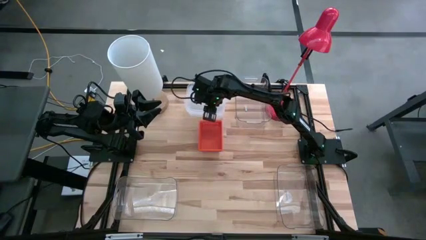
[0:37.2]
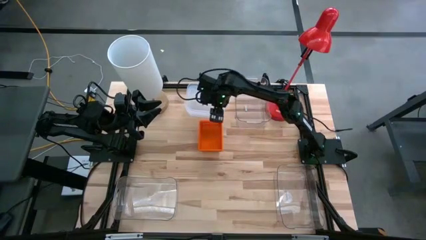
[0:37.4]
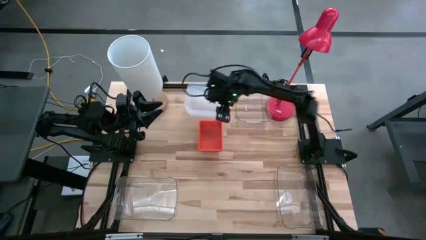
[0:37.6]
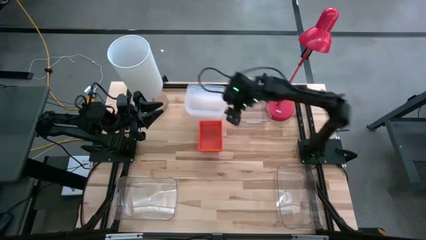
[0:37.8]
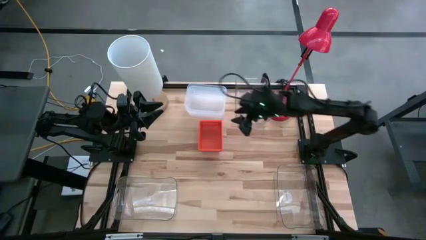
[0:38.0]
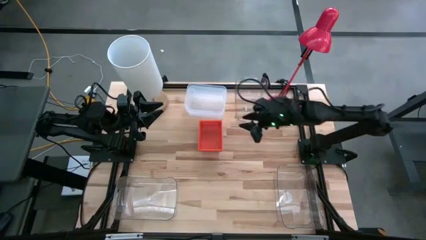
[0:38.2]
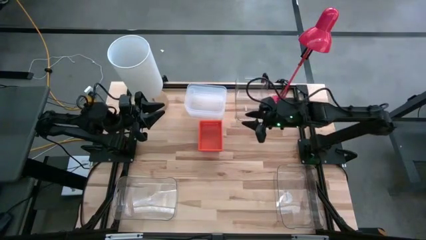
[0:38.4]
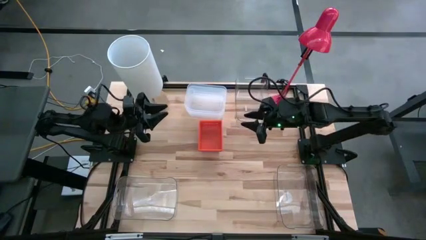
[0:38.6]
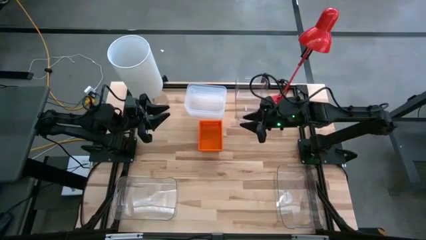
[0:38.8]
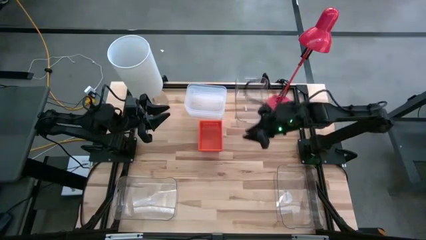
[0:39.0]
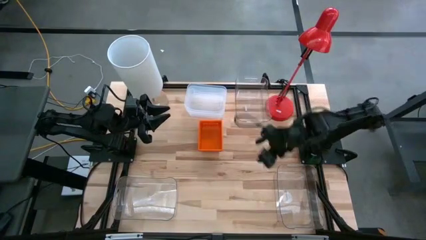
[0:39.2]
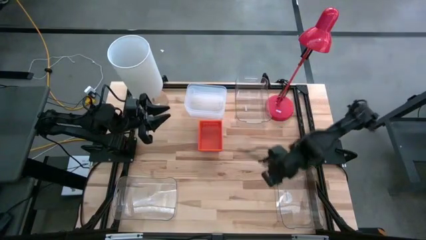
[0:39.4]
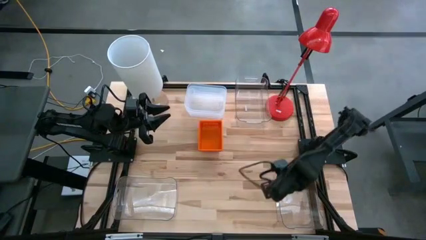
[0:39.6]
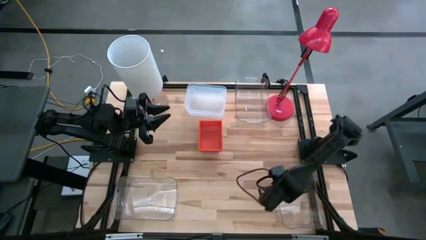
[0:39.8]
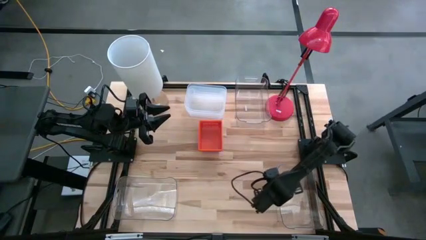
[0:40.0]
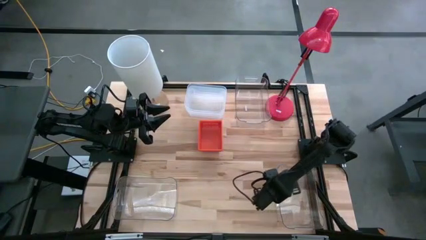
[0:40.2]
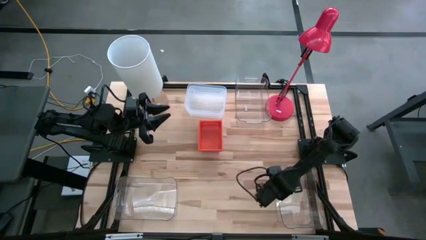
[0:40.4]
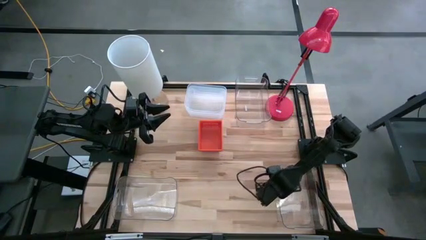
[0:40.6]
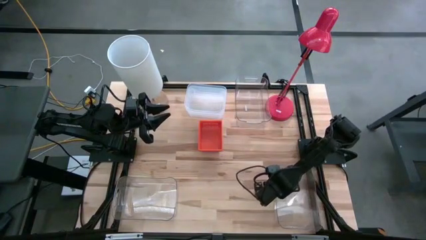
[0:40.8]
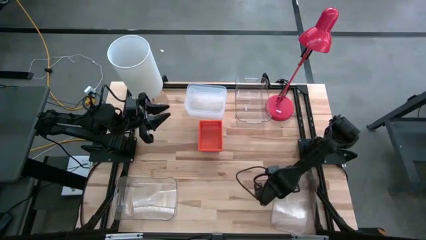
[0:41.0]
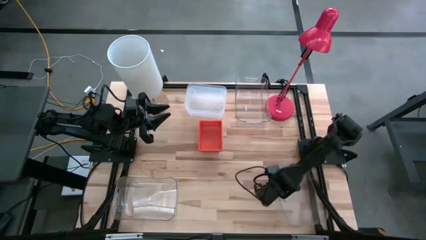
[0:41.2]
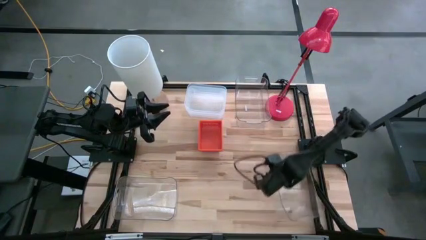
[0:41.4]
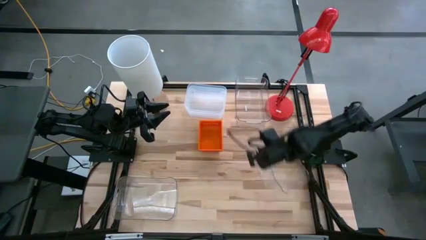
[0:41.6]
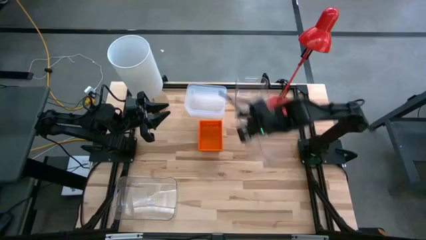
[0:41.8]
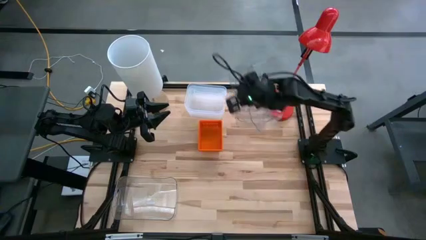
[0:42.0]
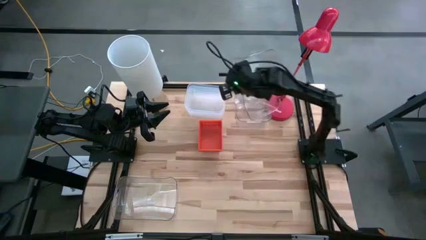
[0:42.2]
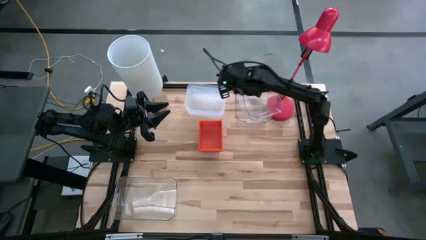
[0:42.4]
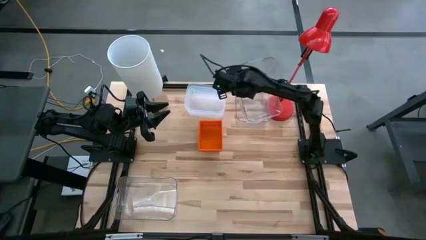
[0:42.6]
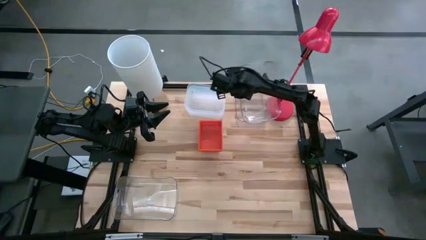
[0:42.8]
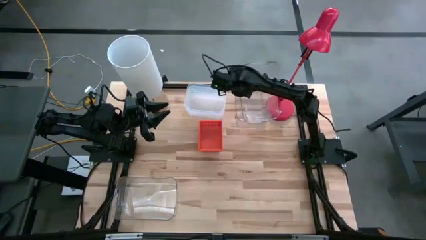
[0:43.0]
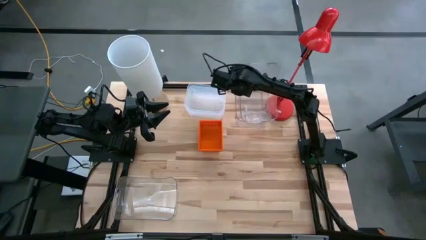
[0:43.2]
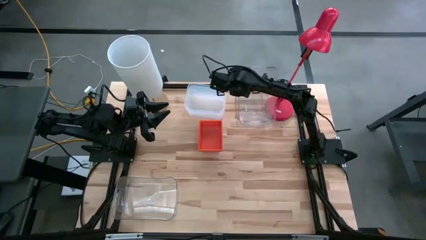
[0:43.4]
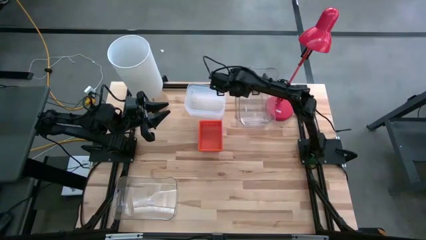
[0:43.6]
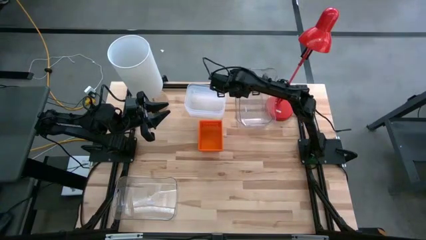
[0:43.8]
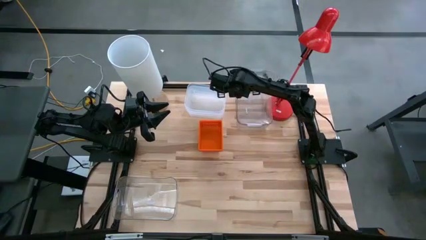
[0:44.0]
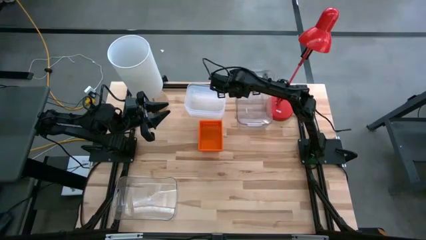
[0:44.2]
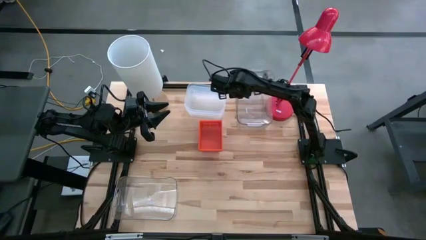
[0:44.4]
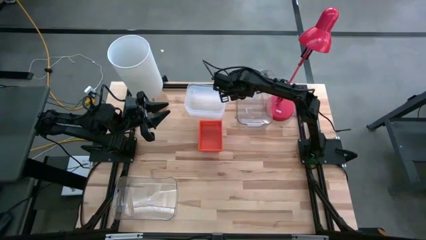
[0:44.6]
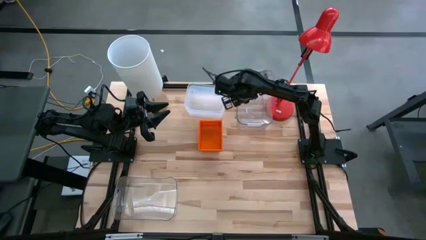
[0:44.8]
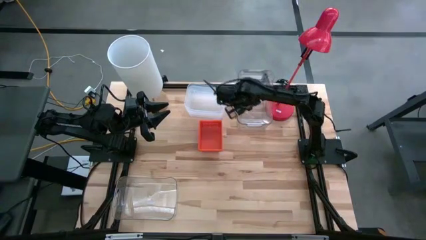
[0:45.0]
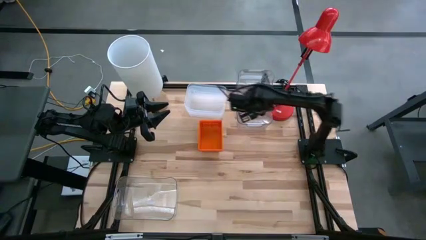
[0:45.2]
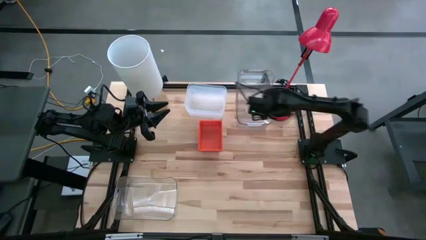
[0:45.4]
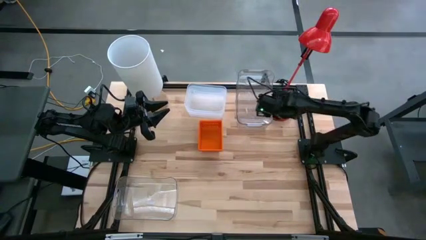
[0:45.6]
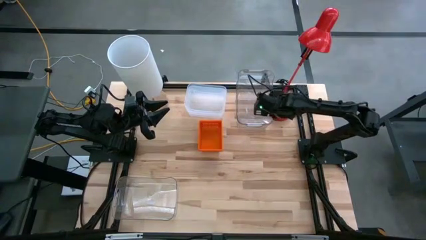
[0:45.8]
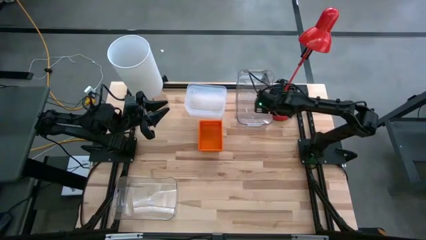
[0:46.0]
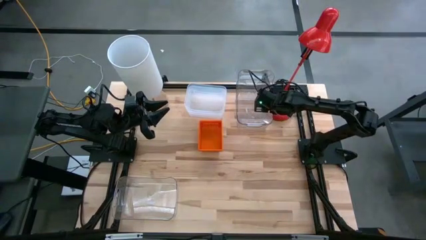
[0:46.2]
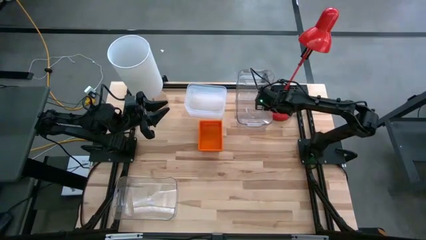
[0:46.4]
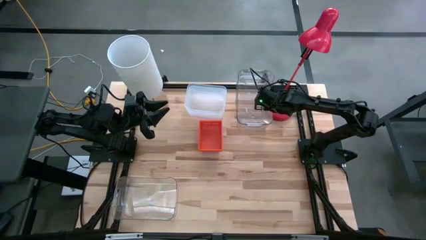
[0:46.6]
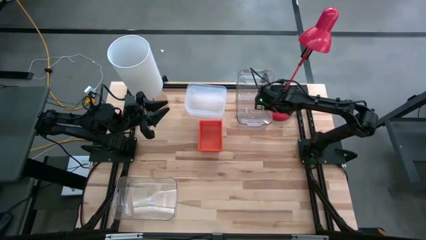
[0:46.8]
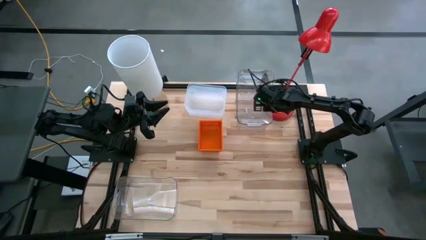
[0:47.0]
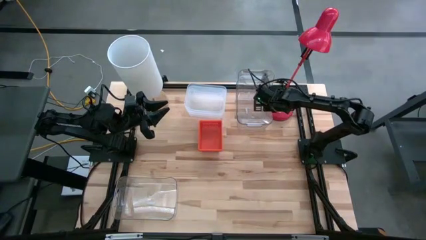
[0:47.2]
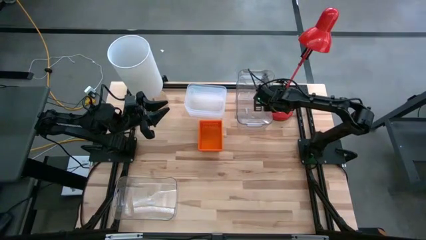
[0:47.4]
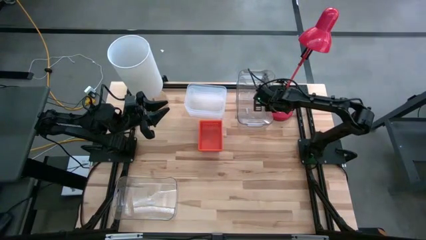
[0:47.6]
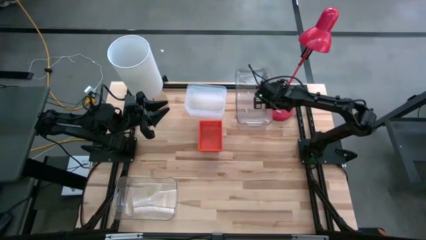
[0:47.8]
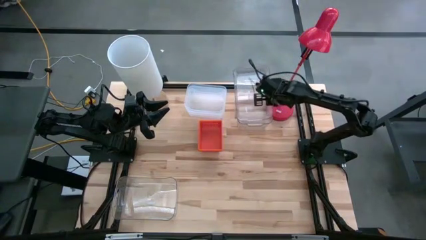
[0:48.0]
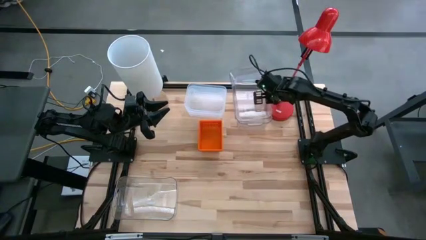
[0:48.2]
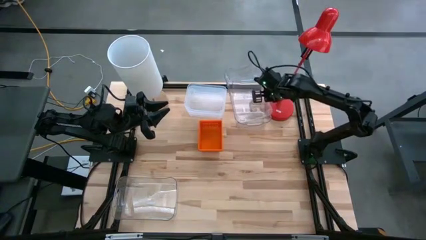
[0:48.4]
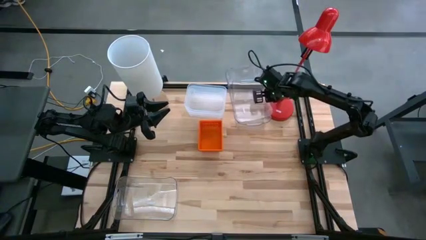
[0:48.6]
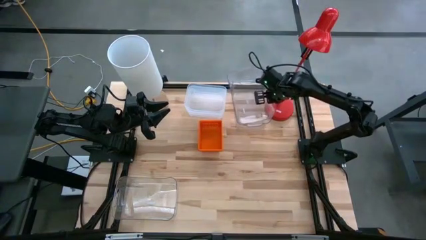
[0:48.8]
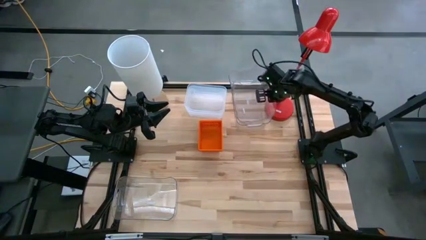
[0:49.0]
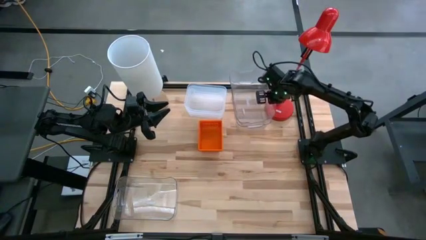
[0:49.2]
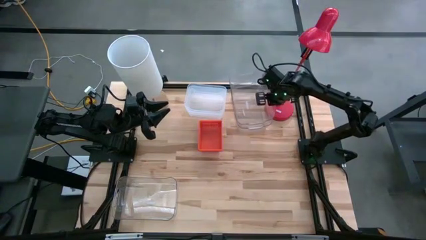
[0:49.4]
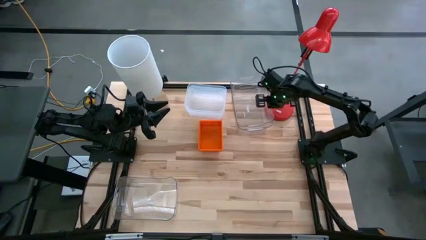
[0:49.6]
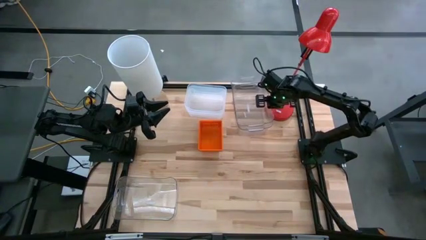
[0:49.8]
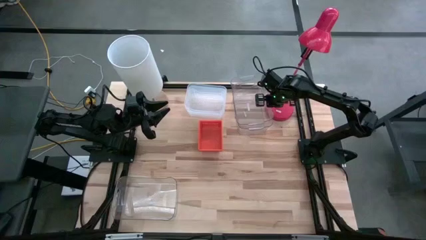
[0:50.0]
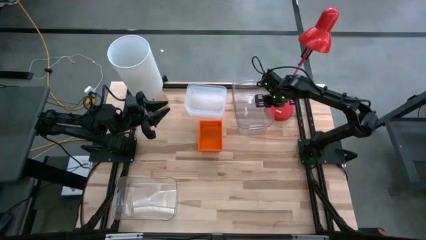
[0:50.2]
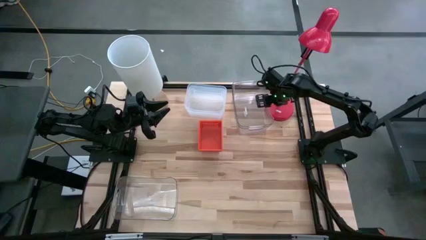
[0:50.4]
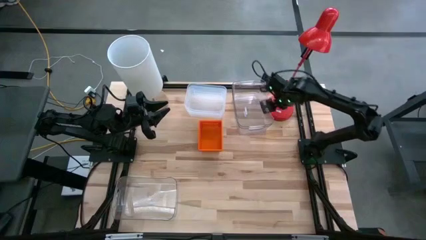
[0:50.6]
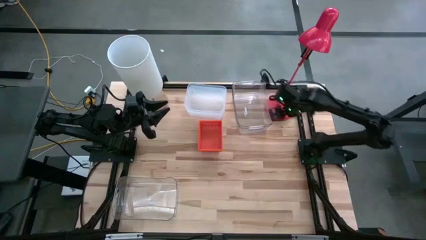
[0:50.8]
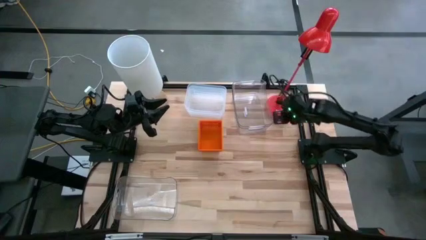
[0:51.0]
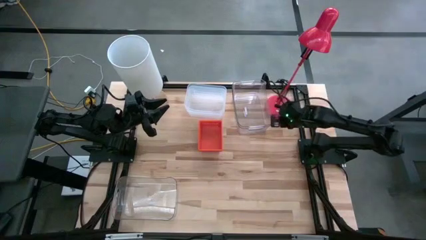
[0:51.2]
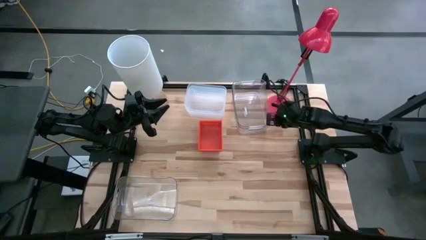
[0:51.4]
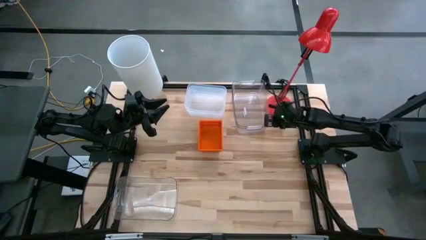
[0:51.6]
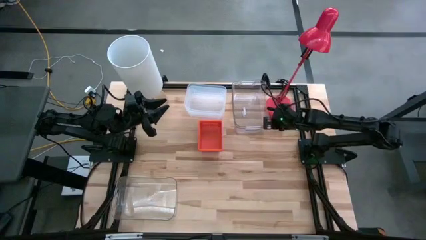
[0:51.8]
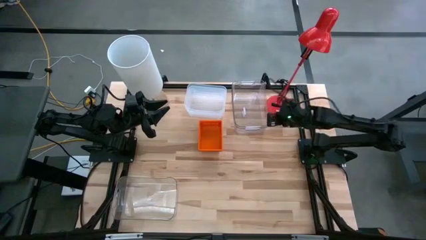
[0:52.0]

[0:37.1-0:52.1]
Stack the bottom right transparent bin on the top transparent bin
